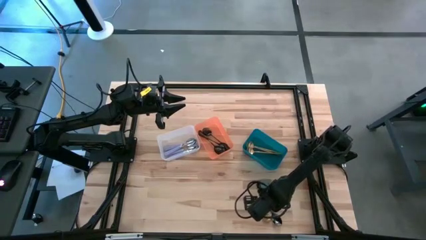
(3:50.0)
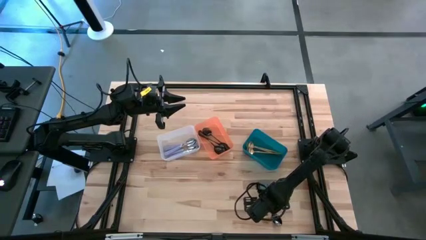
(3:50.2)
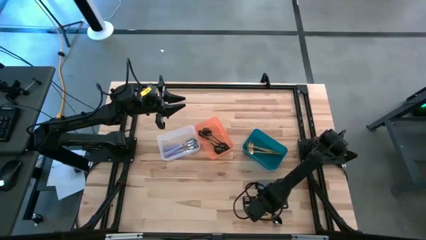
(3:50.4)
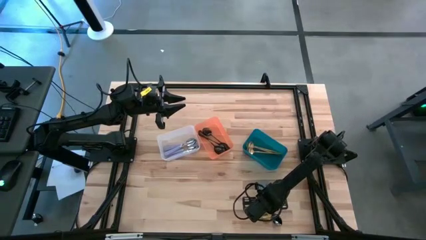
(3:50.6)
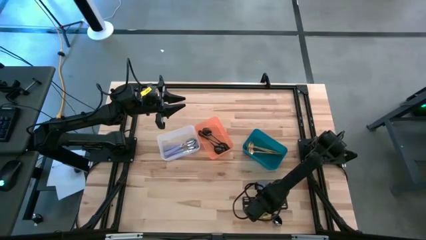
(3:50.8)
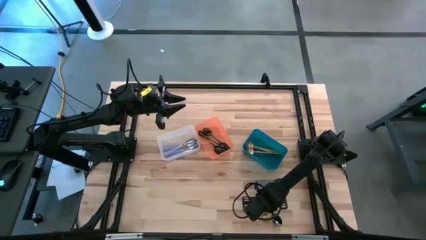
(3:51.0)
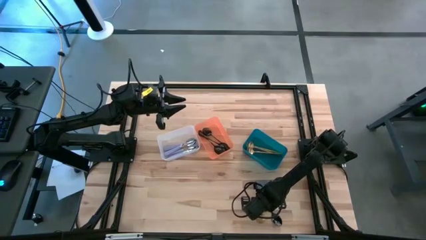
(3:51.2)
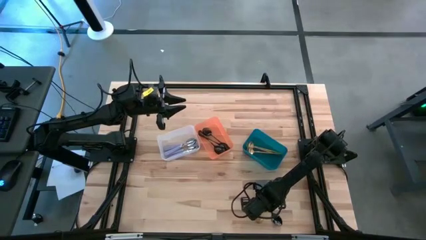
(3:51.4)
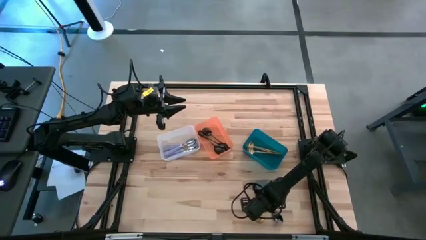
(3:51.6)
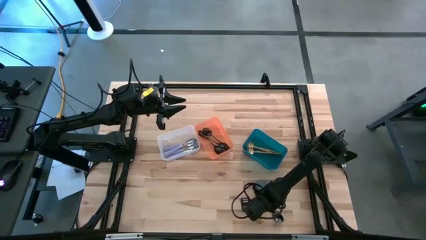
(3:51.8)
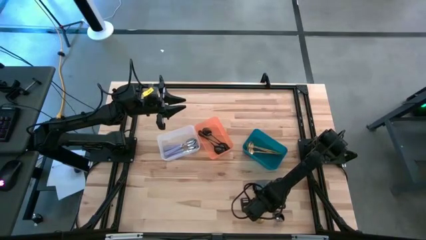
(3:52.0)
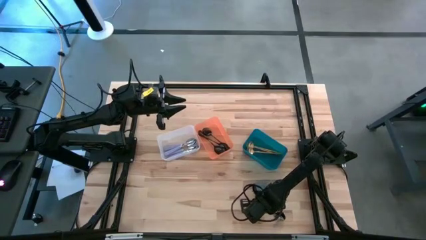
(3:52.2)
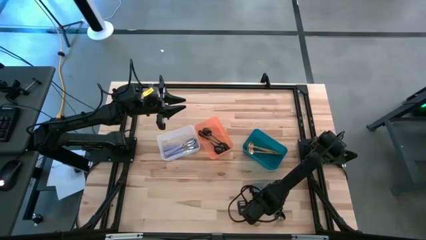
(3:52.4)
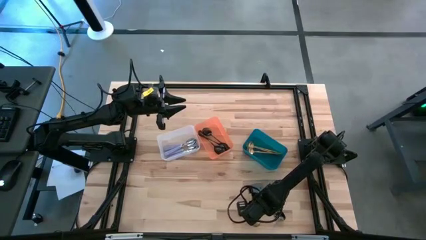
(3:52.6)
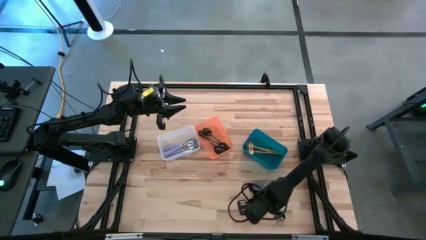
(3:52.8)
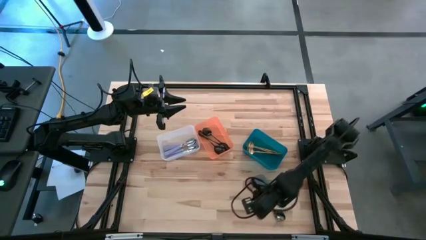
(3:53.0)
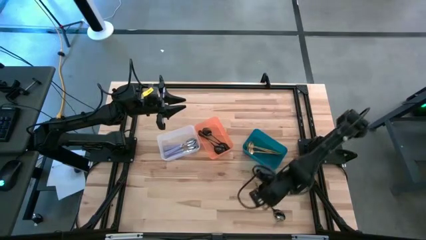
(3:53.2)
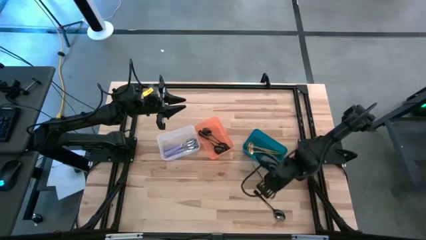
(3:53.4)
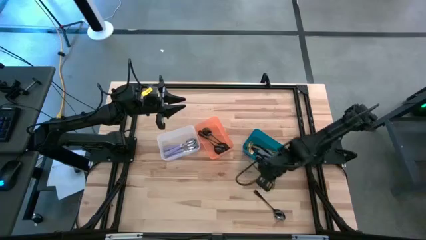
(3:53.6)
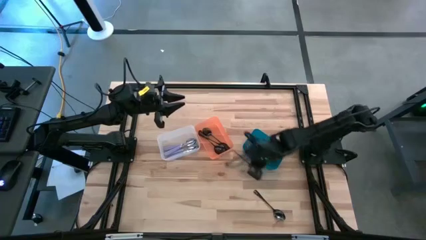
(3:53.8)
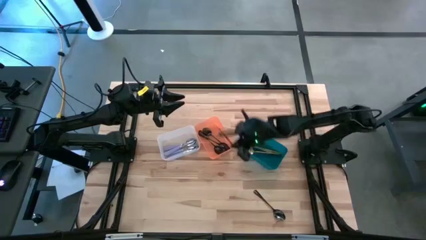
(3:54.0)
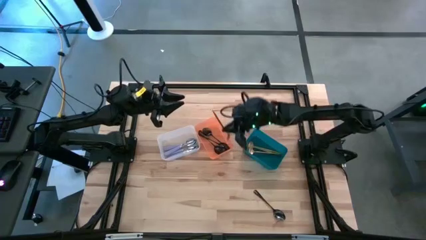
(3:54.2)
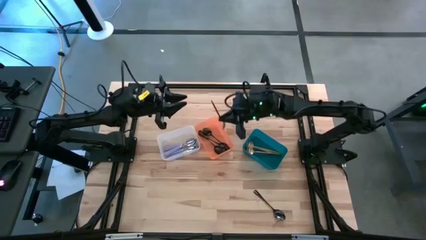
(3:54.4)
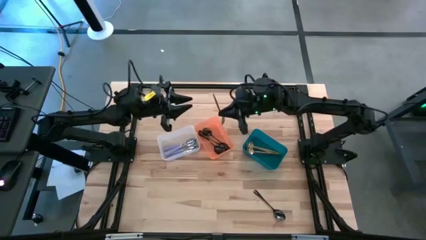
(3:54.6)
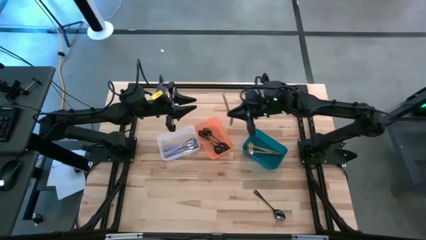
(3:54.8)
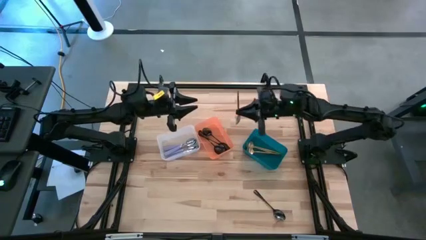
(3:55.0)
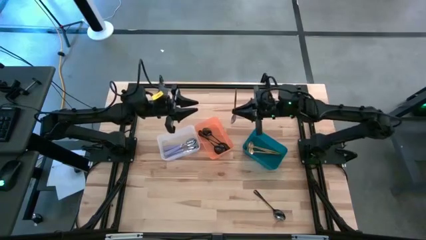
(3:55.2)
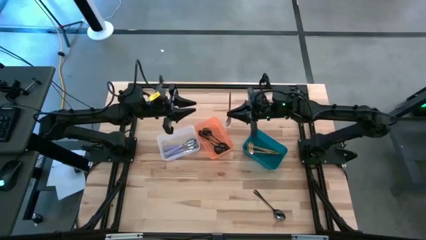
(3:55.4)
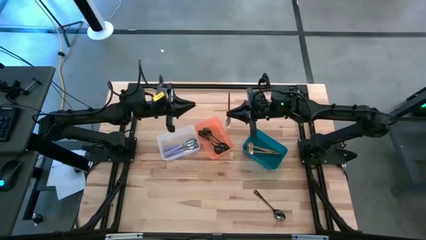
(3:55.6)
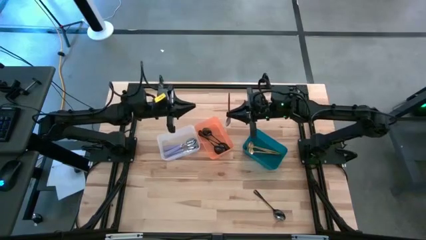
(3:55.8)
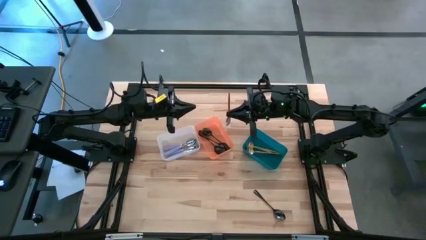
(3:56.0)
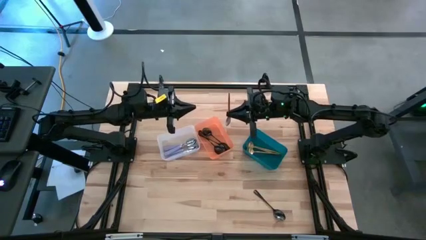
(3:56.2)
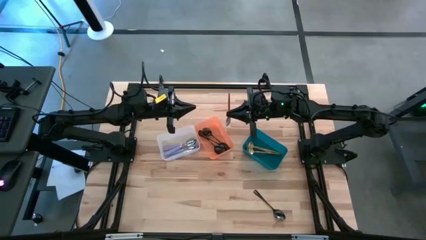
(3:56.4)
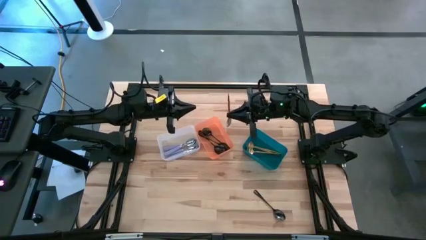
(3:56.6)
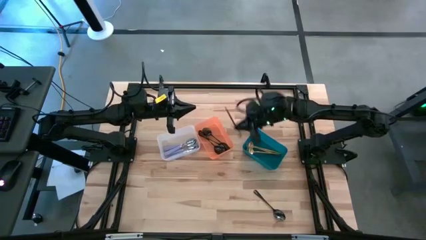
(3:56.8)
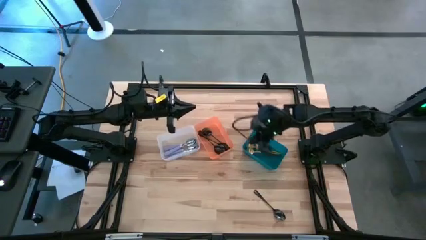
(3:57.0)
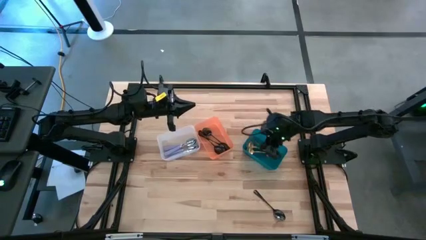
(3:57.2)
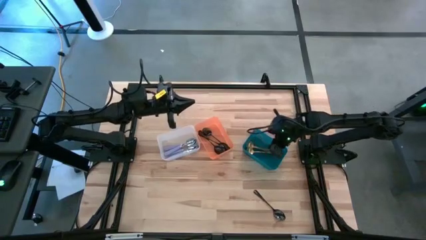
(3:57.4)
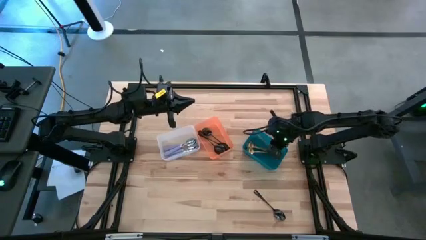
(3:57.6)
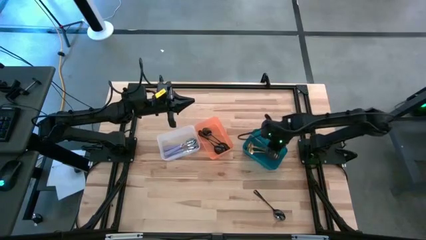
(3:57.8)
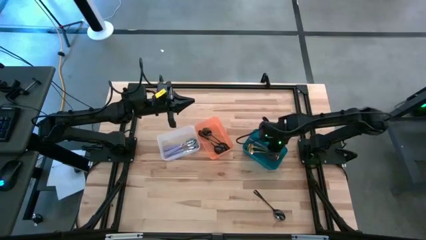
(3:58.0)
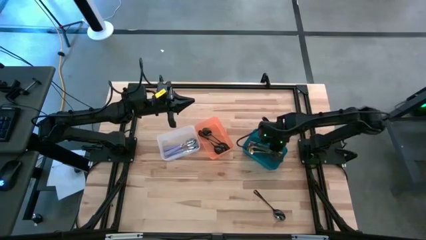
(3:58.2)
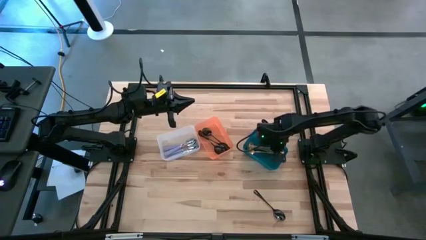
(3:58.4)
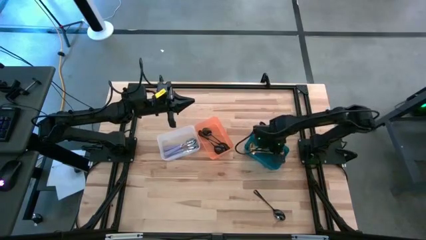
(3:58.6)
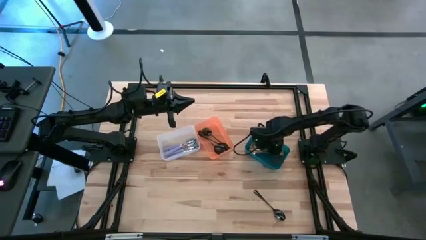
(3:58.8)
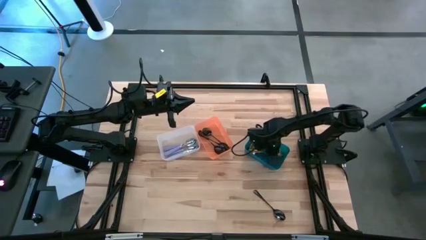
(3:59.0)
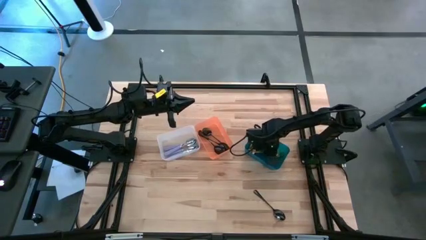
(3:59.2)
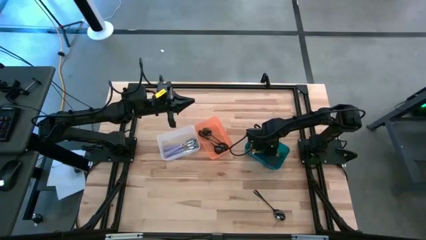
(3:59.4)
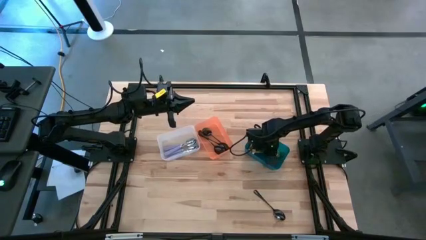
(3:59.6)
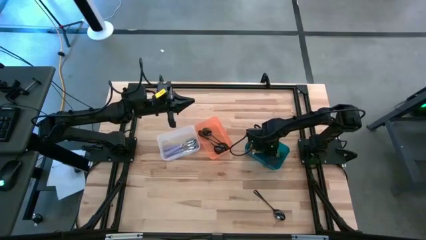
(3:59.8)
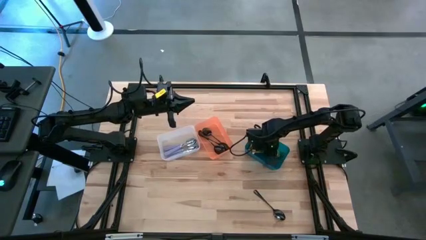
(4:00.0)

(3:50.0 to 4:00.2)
Task: Sort silverware by color (type)
Put the gold spoon into the blue bin

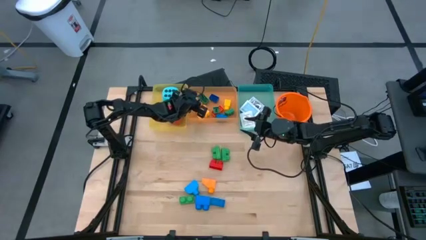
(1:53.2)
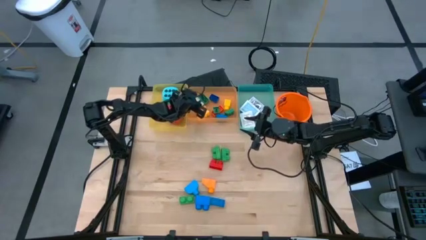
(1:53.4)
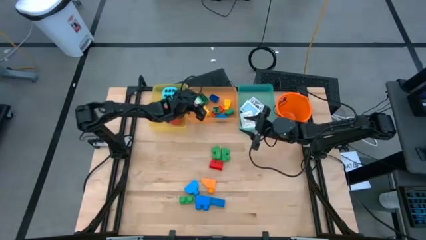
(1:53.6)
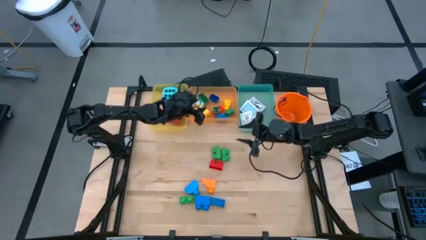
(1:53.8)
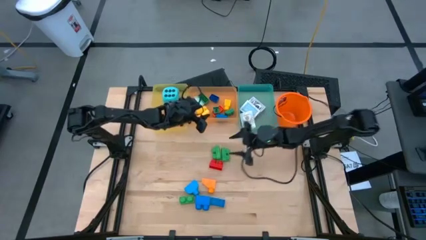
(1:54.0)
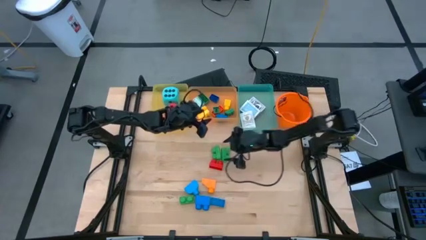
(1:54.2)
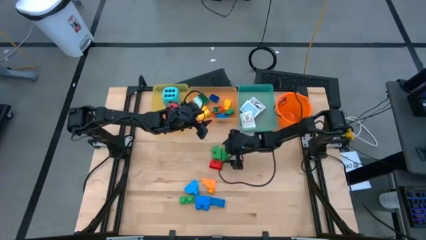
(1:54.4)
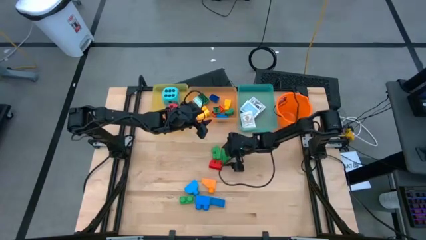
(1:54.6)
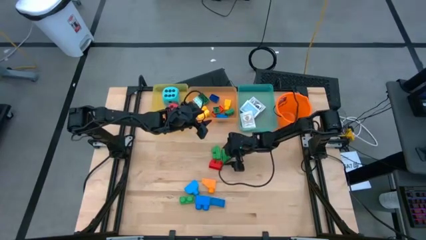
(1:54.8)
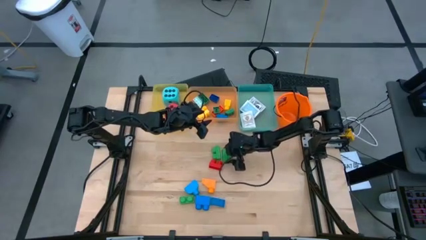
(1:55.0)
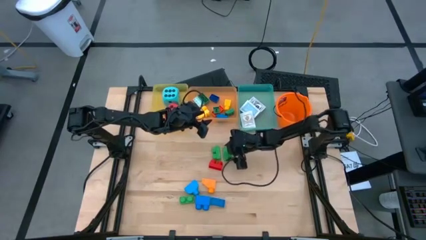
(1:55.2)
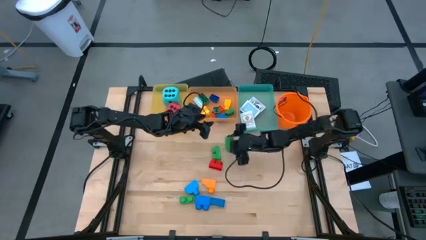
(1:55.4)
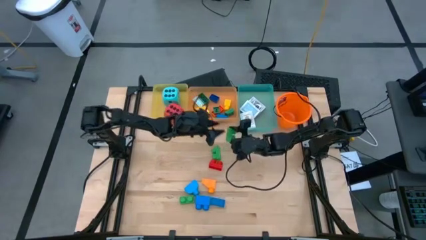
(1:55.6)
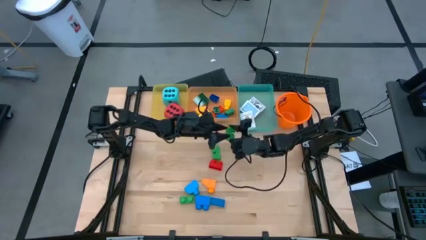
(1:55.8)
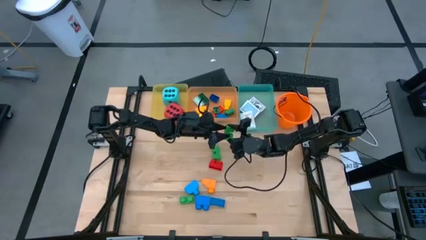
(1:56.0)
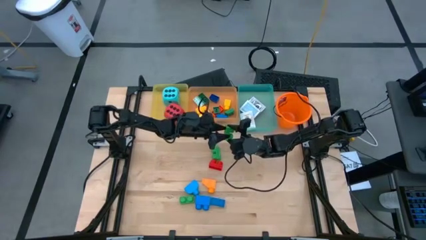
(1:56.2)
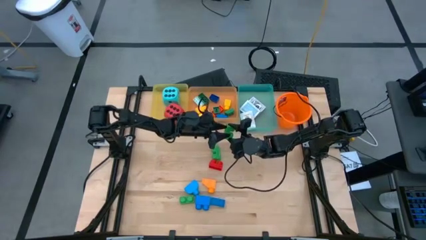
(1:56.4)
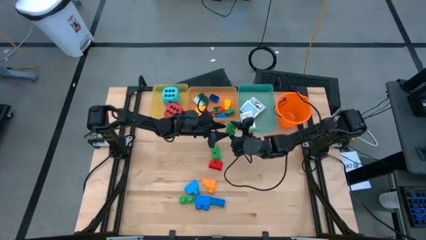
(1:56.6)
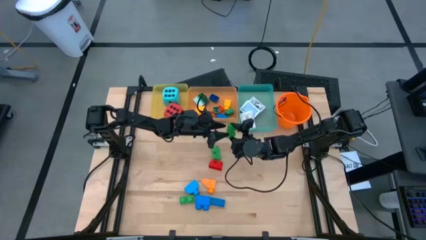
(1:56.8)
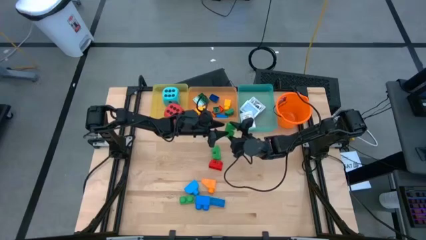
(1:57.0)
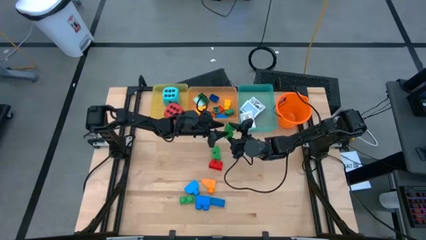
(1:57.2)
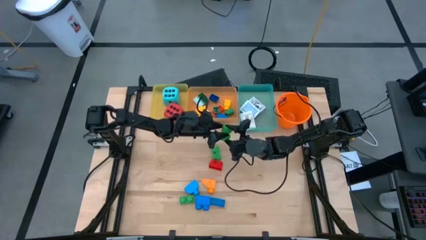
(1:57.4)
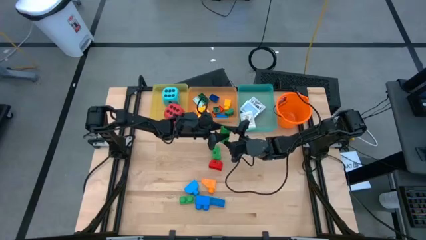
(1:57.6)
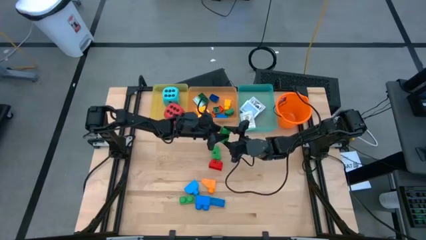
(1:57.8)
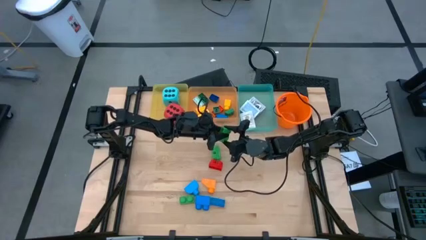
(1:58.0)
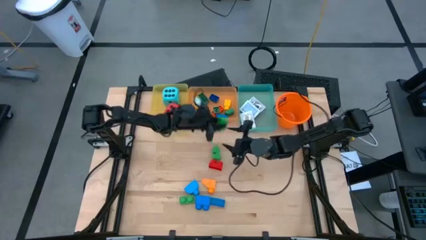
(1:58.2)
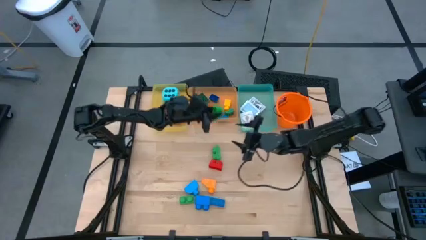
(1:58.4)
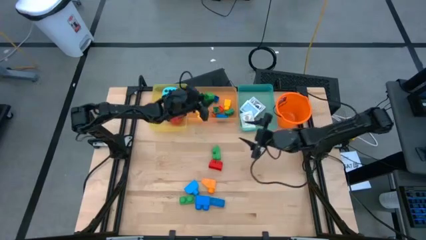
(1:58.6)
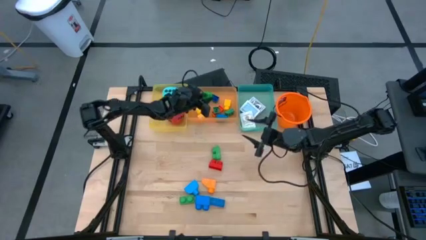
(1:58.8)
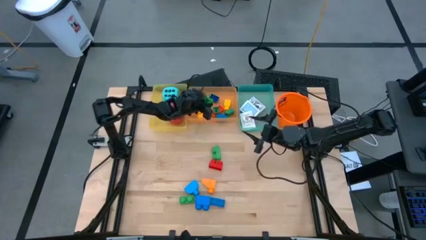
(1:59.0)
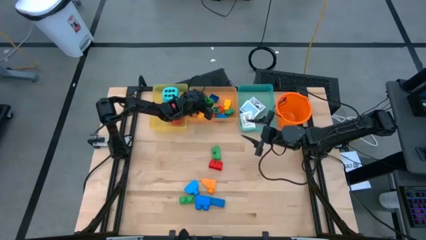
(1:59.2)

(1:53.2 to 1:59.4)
Task: Pick & Place Toys
Put the green game piece into the orange bin
